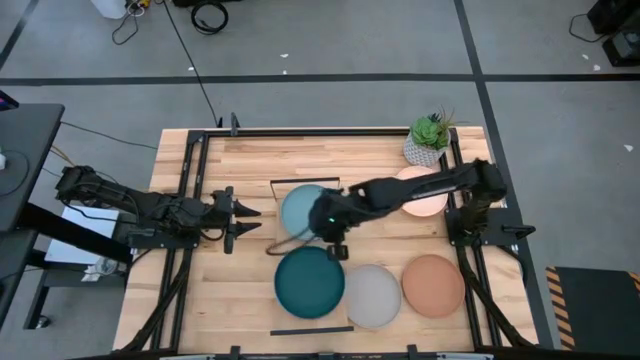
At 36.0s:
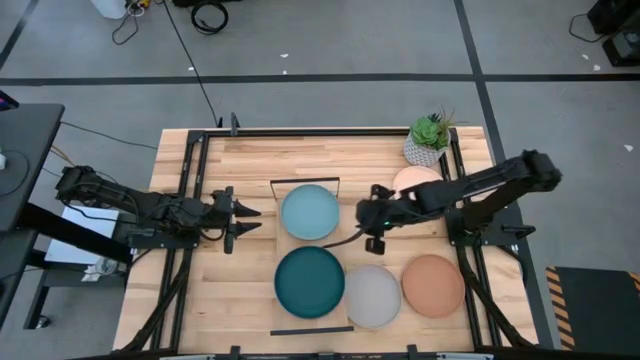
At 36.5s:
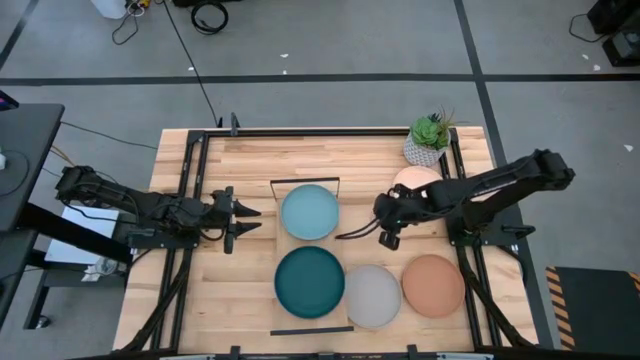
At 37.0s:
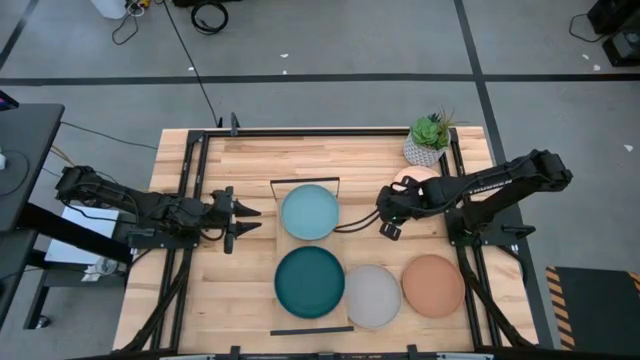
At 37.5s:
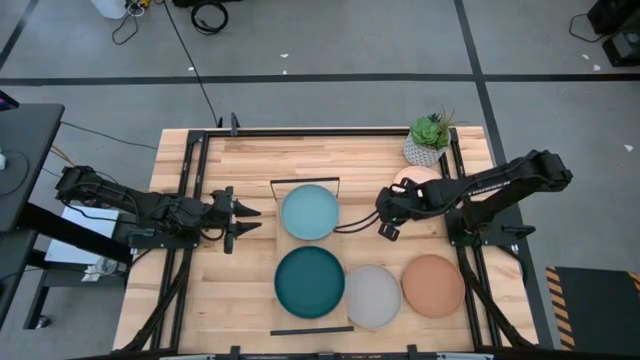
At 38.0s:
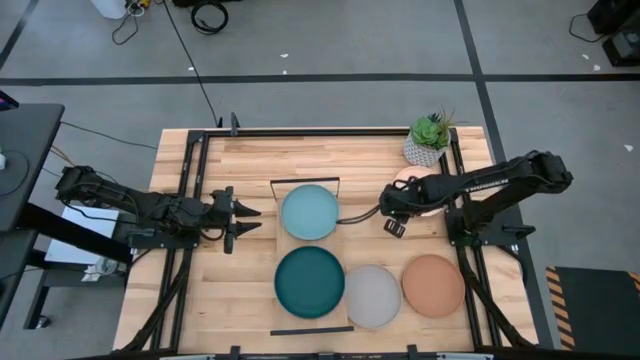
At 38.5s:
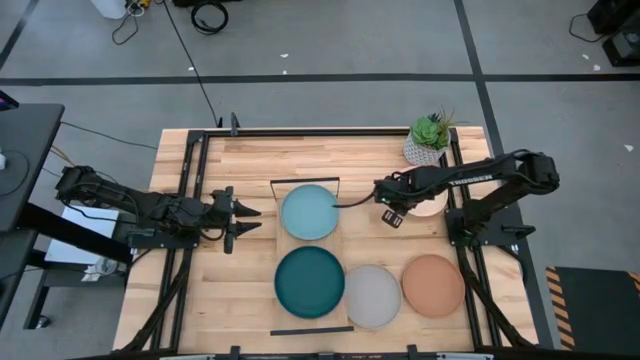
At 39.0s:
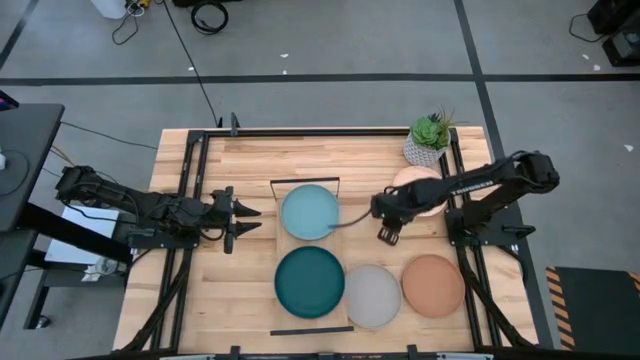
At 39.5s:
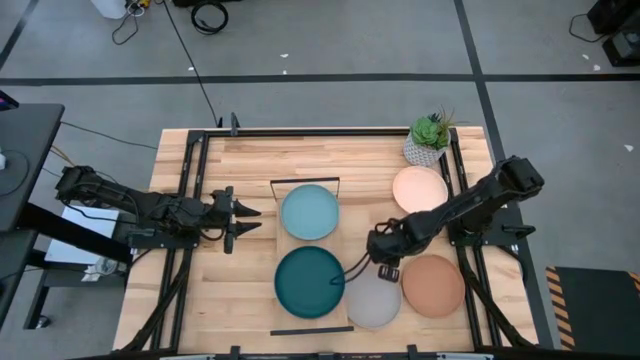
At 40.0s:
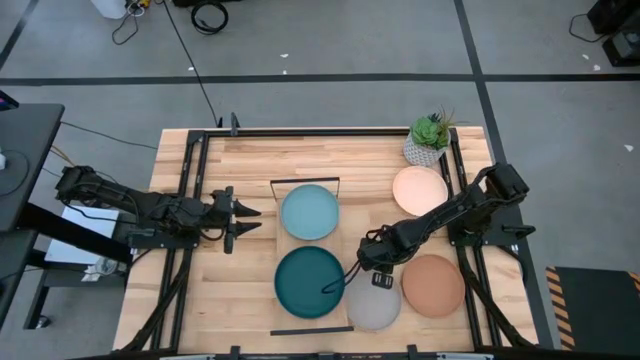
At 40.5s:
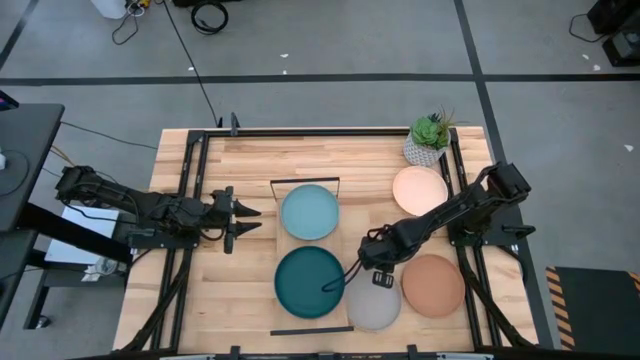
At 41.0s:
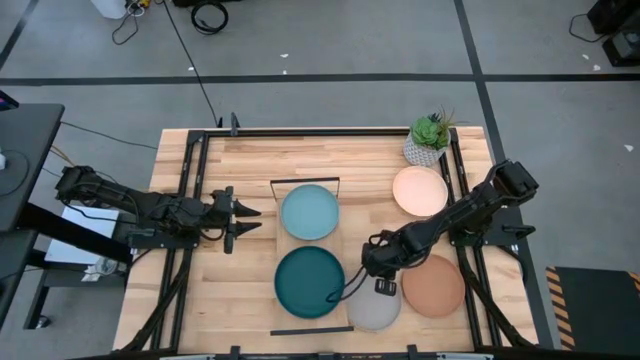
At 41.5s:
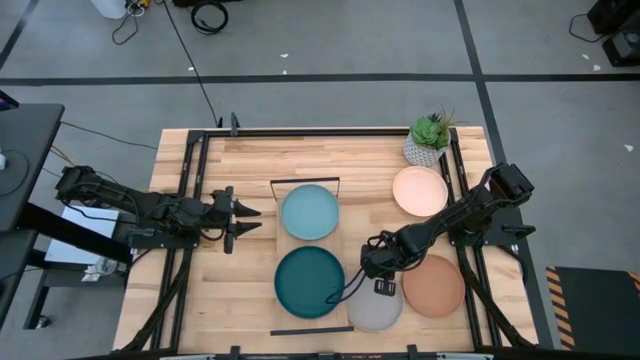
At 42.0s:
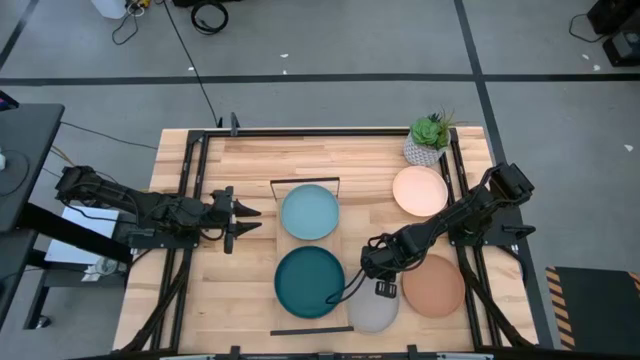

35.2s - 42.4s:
Task: Place and stack plates onto a shelf
Stack the gray plate on top of the light blue plate on the shelf

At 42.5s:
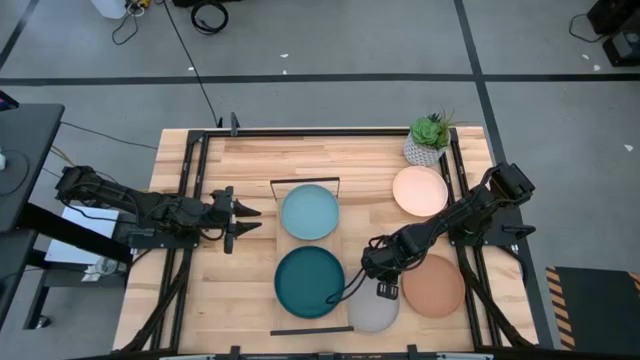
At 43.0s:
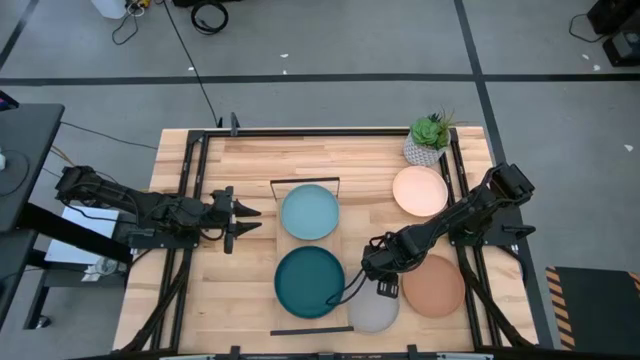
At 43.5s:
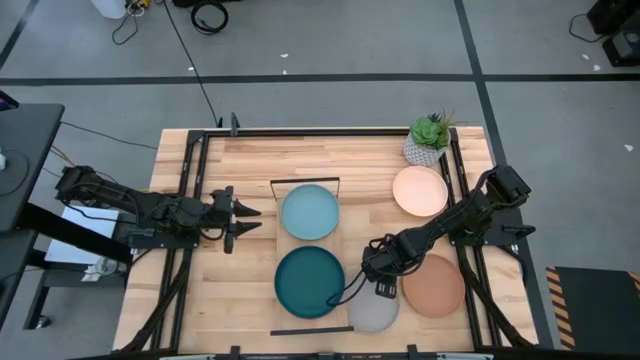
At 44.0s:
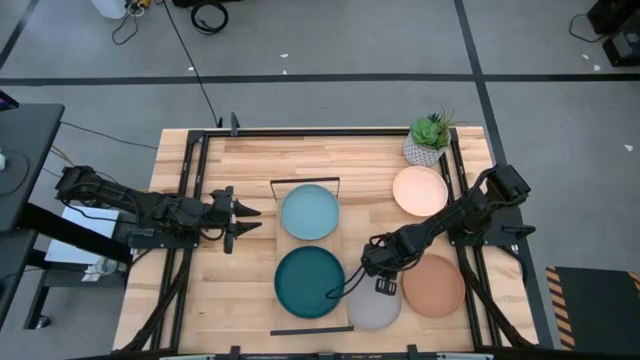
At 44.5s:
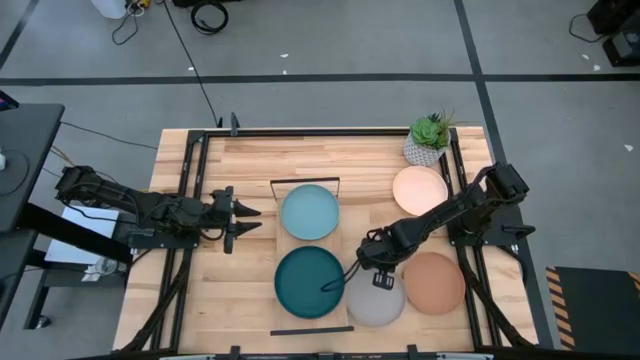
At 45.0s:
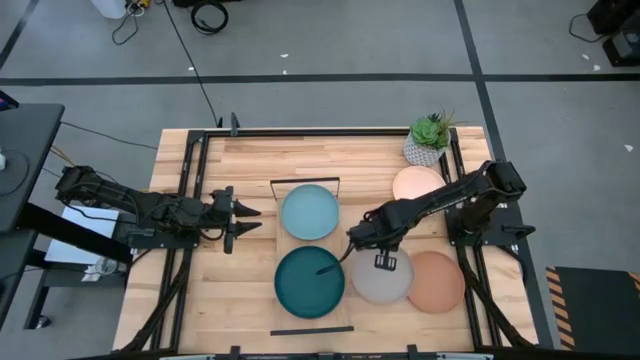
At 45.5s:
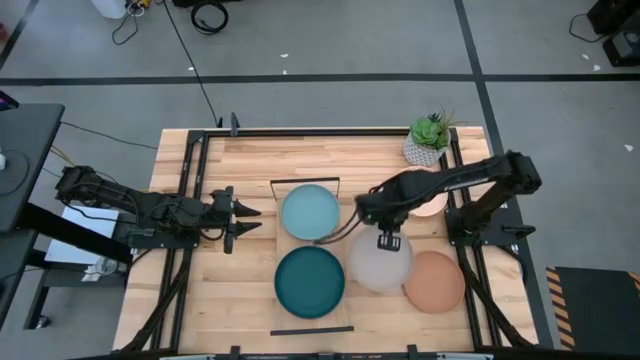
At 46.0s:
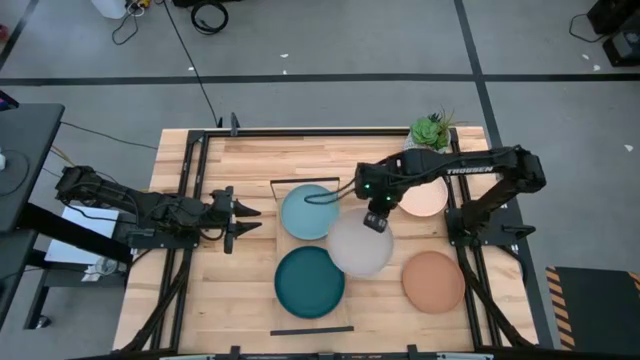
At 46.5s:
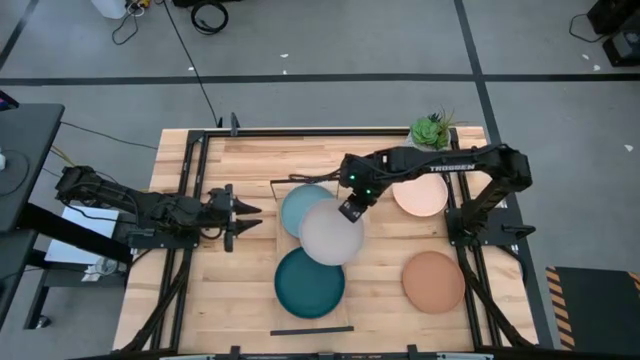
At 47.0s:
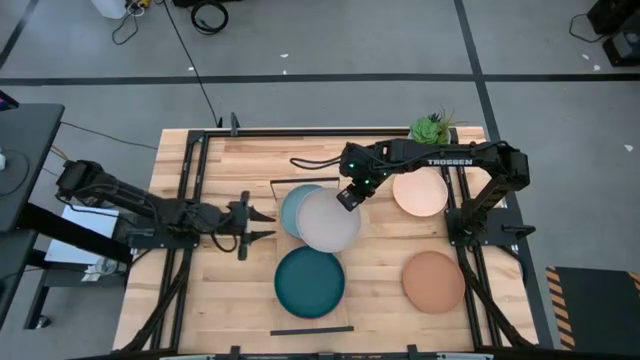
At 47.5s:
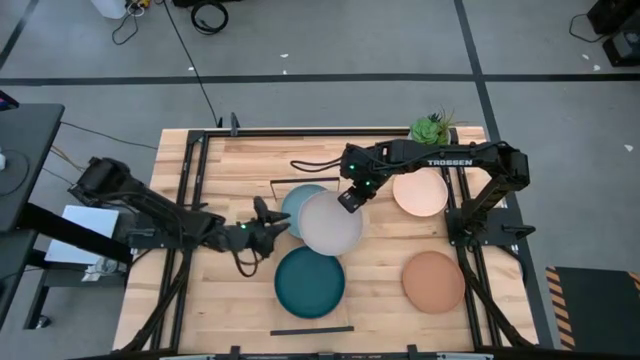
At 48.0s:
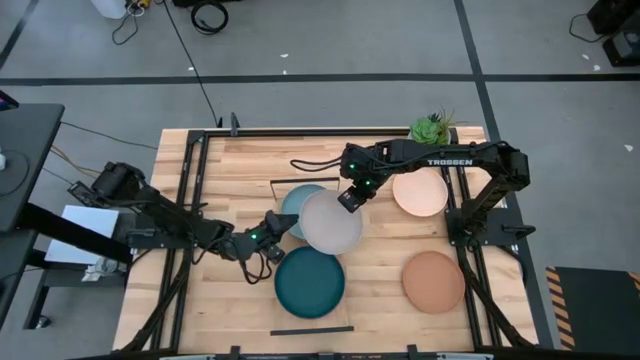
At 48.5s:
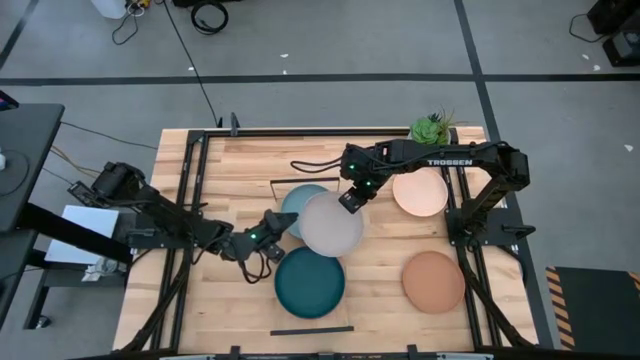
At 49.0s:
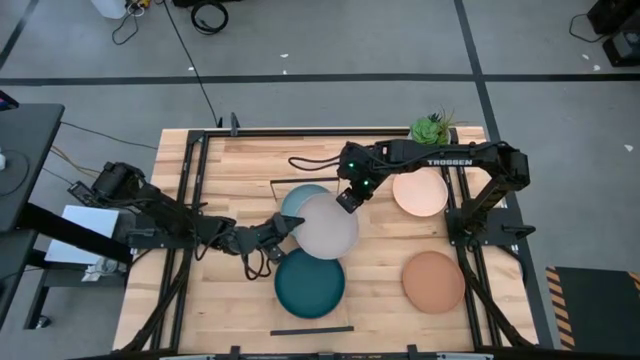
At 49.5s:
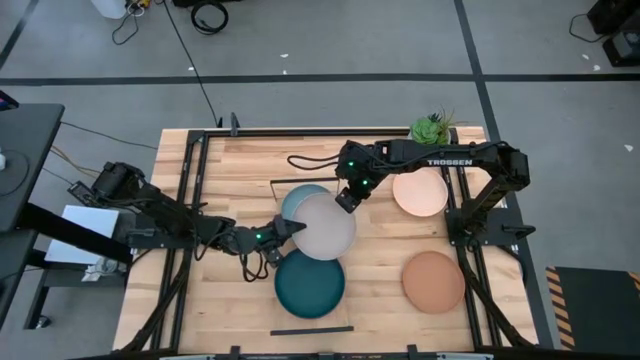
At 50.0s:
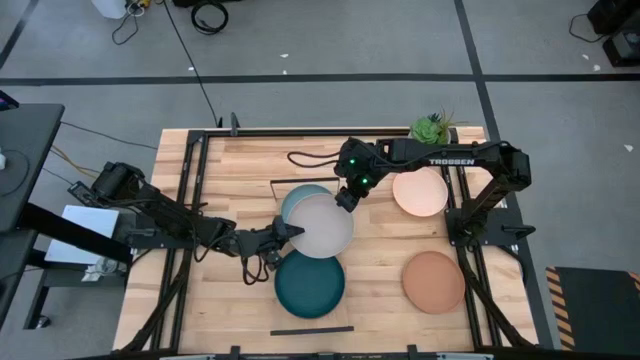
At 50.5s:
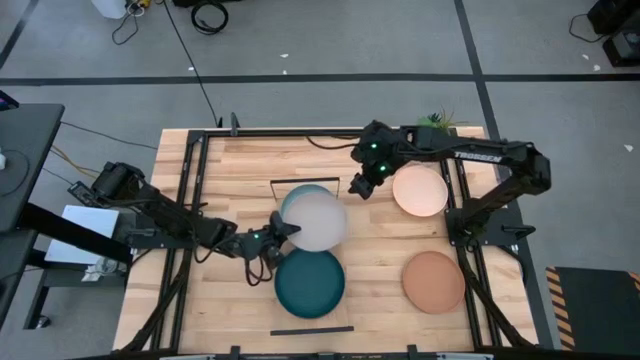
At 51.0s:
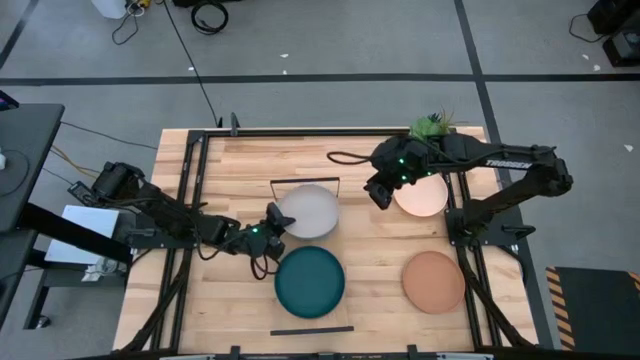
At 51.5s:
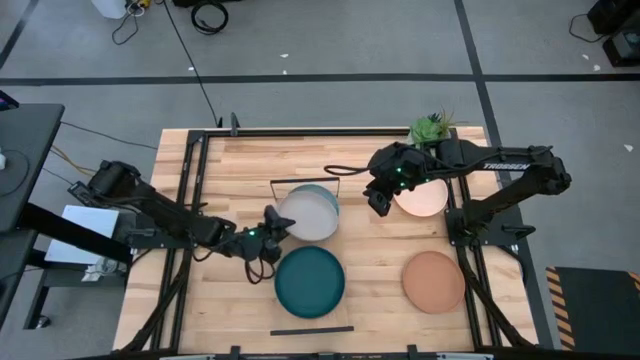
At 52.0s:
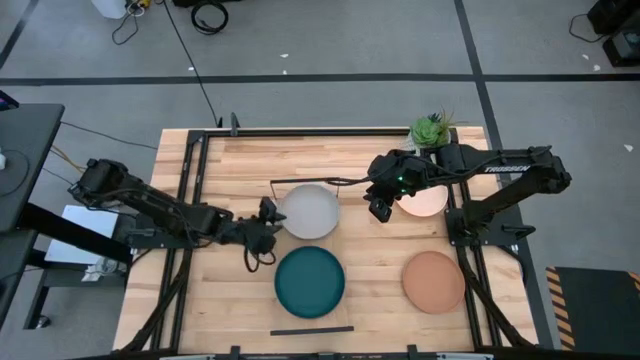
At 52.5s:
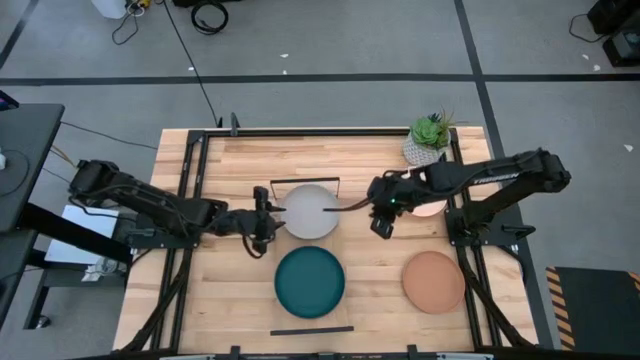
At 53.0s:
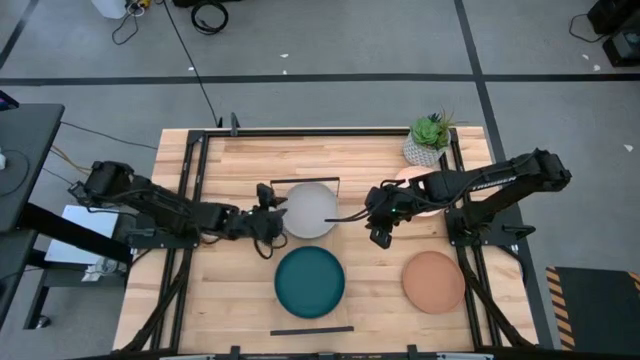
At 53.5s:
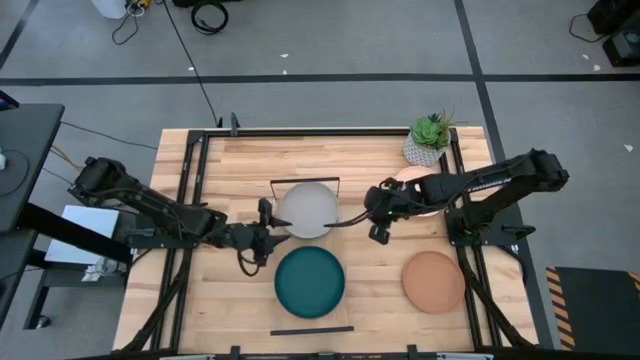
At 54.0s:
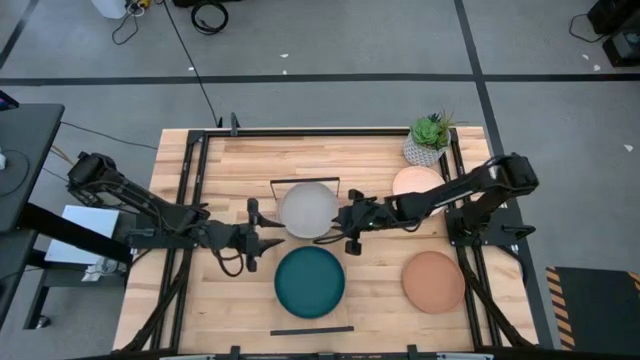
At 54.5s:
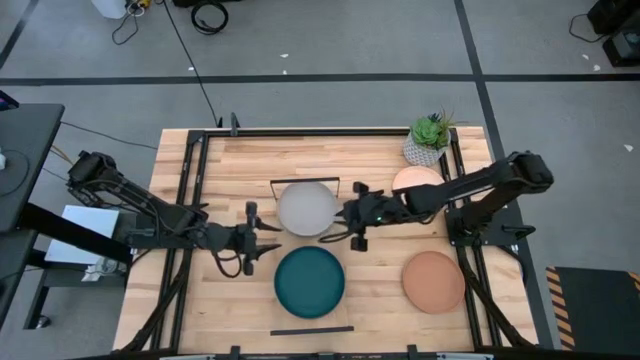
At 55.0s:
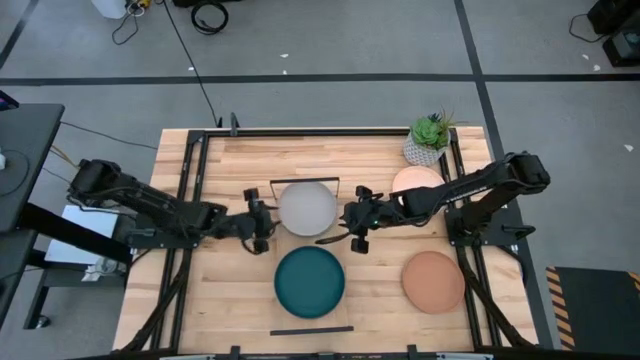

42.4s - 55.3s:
Stack the gray plate on top of the light blue plate on the shelf

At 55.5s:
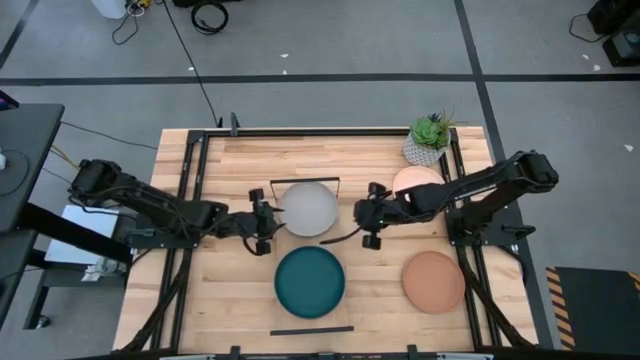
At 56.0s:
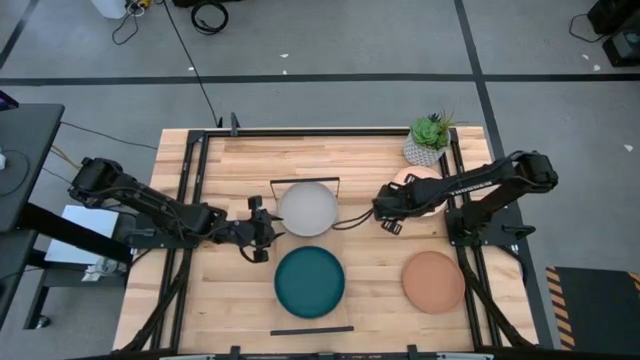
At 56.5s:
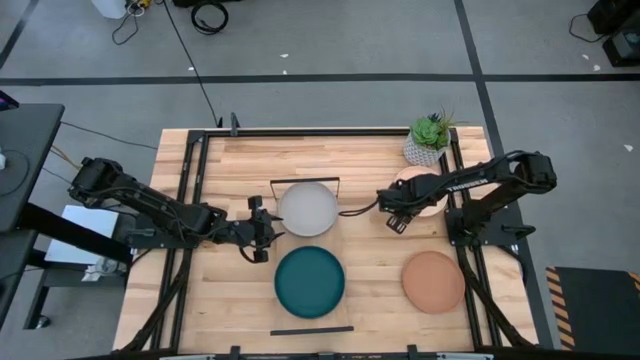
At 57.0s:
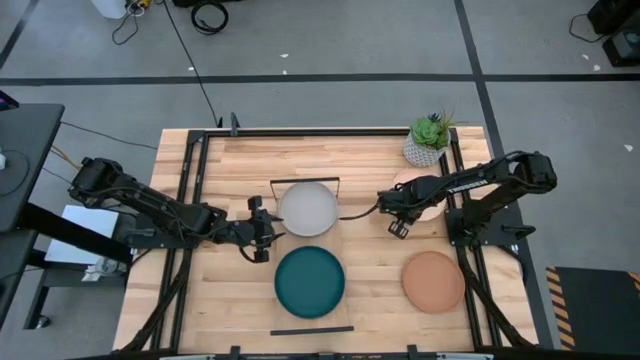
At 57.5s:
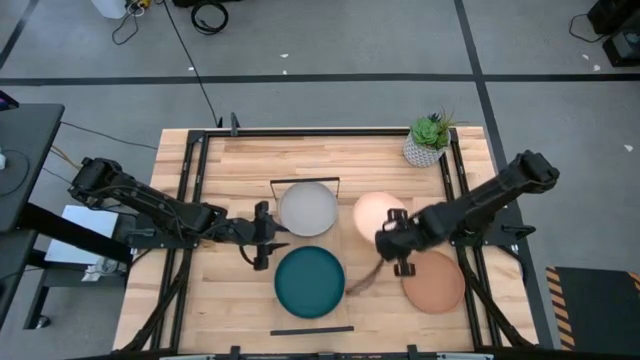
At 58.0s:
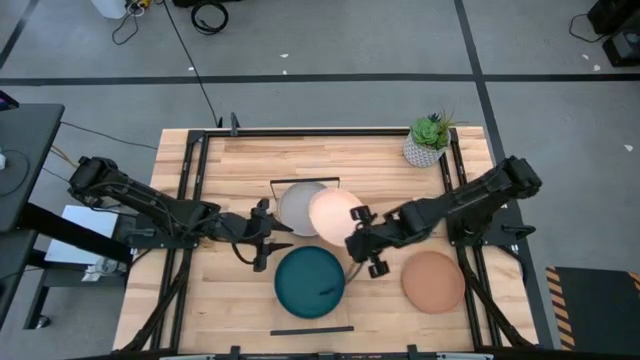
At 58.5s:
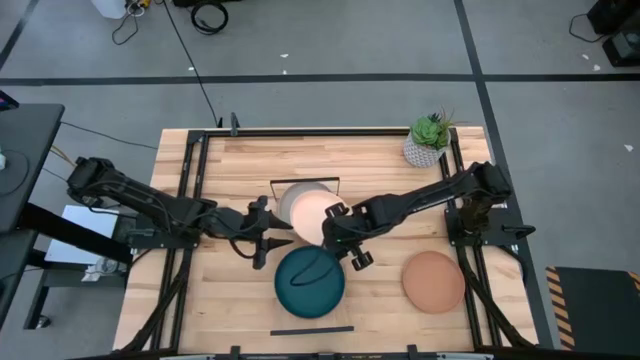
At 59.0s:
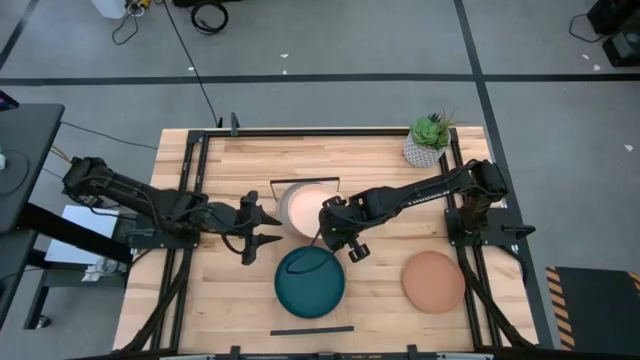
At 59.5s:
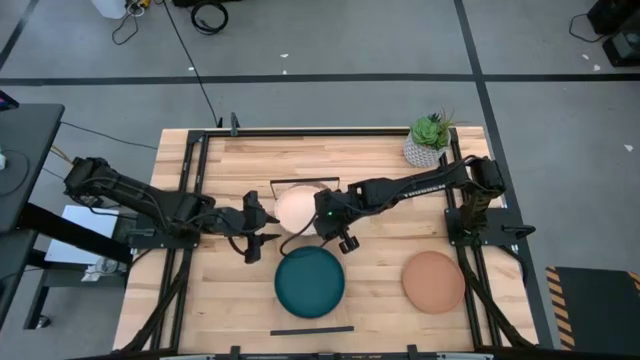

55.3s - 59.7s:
Stack the light orange plate on top of the gray plate on the shelf
